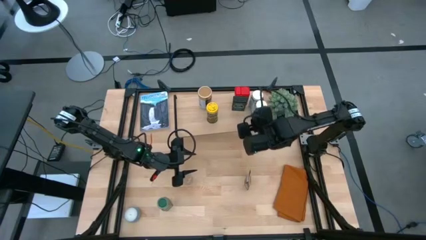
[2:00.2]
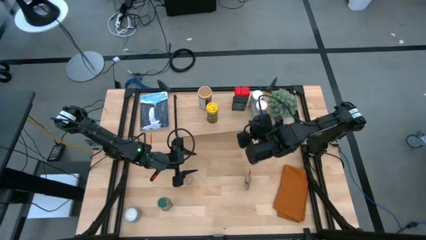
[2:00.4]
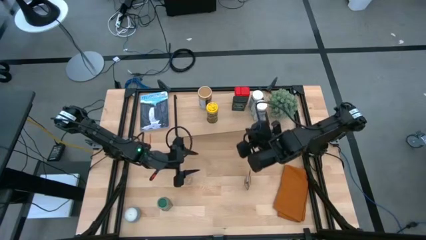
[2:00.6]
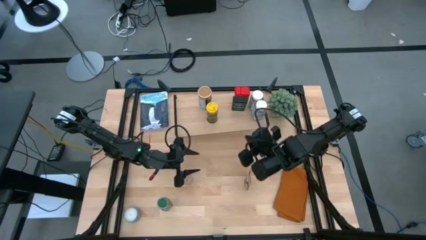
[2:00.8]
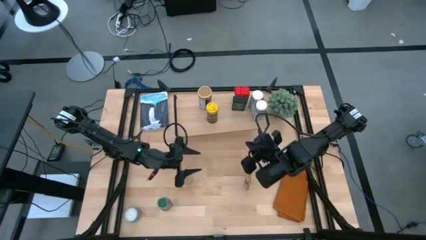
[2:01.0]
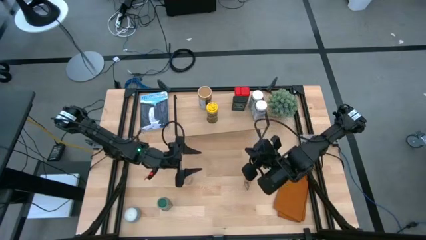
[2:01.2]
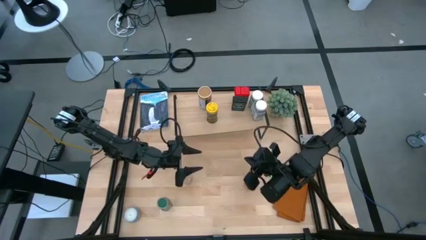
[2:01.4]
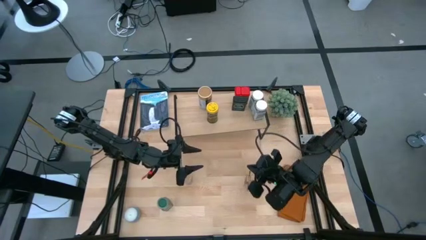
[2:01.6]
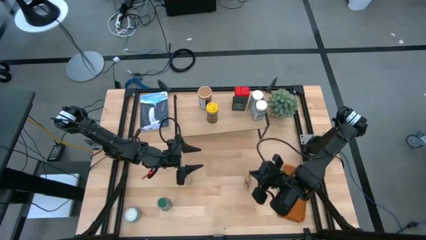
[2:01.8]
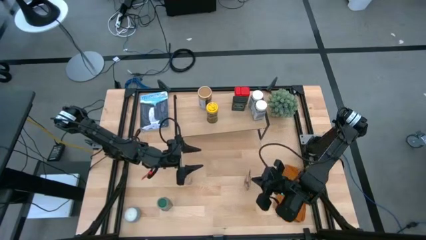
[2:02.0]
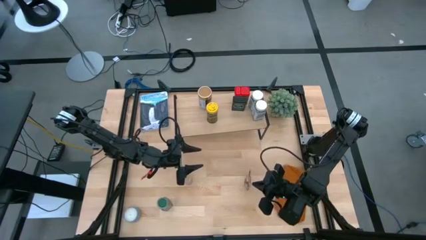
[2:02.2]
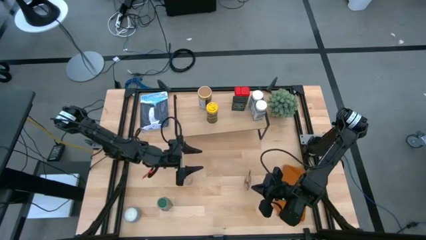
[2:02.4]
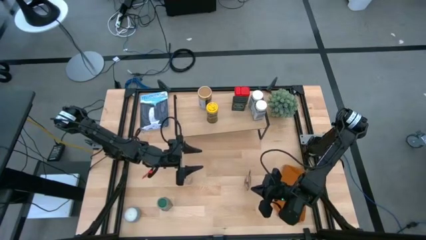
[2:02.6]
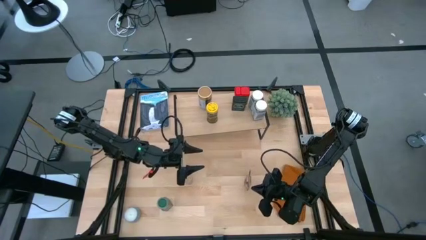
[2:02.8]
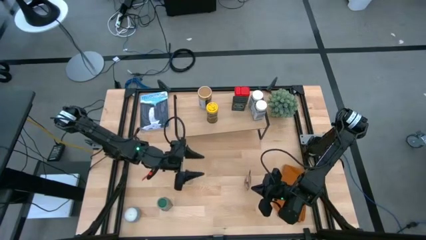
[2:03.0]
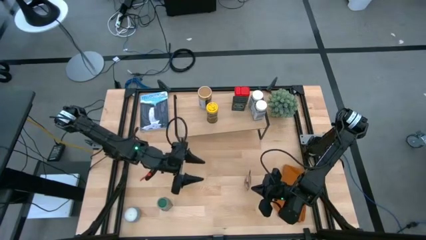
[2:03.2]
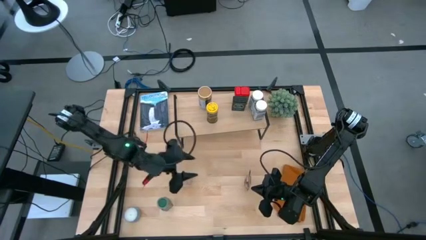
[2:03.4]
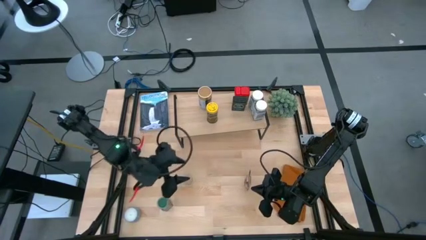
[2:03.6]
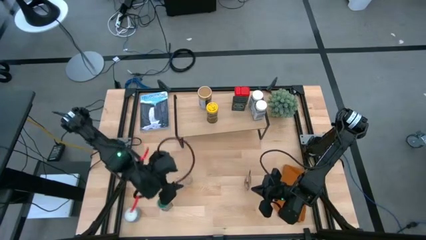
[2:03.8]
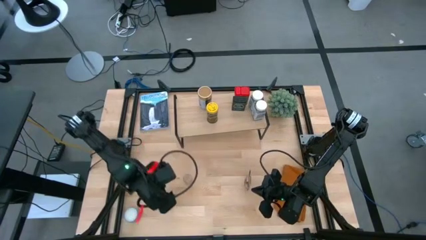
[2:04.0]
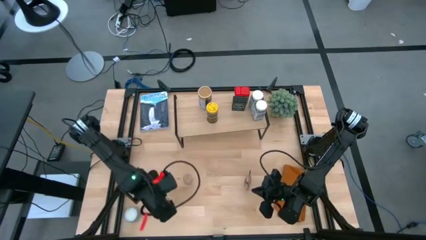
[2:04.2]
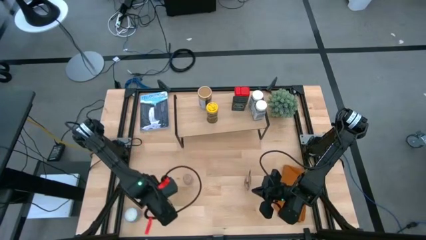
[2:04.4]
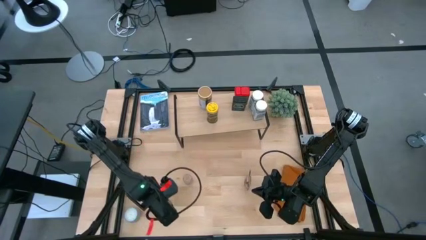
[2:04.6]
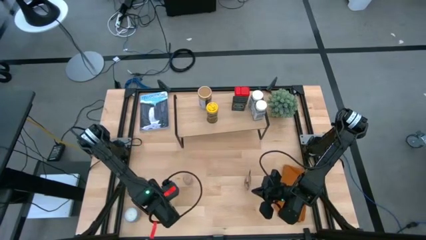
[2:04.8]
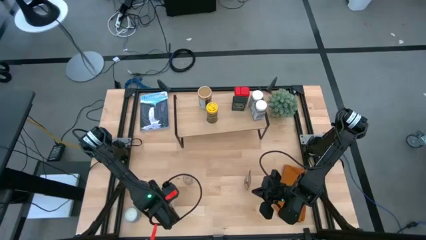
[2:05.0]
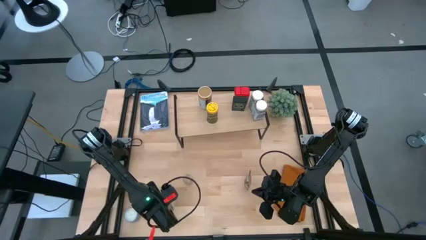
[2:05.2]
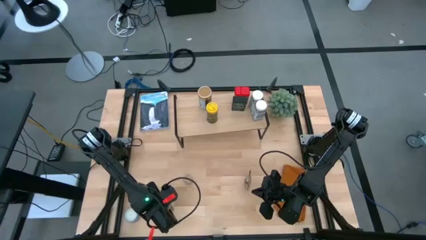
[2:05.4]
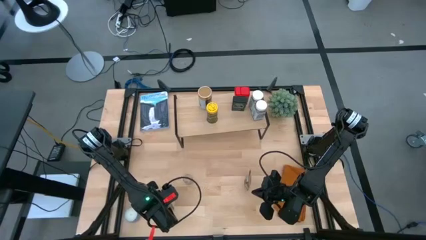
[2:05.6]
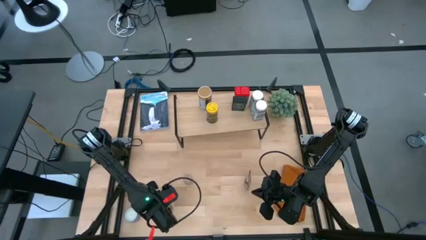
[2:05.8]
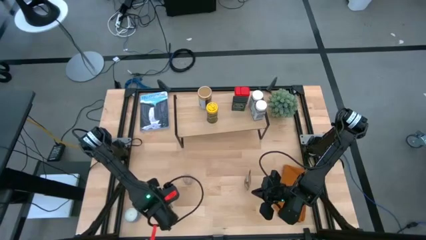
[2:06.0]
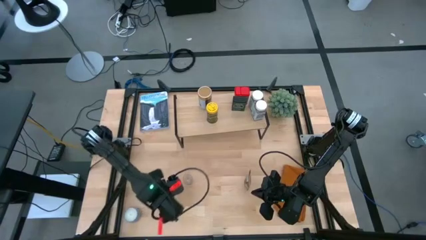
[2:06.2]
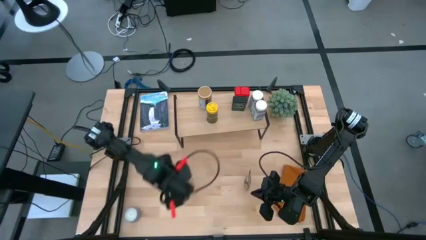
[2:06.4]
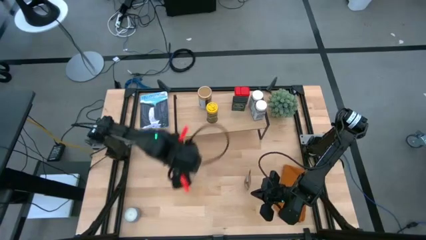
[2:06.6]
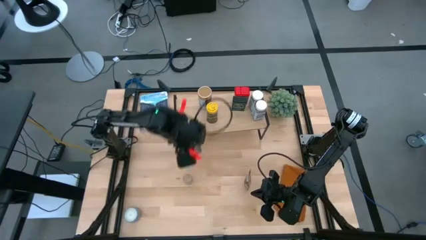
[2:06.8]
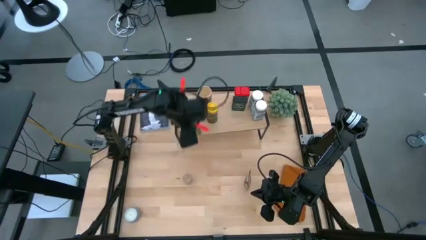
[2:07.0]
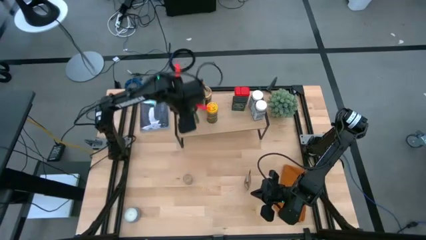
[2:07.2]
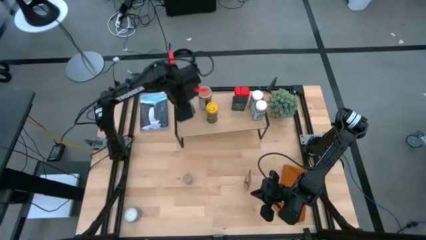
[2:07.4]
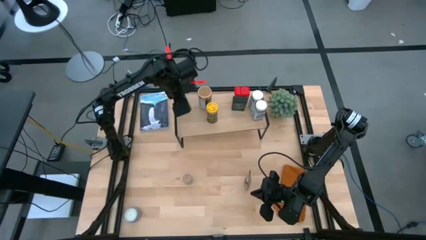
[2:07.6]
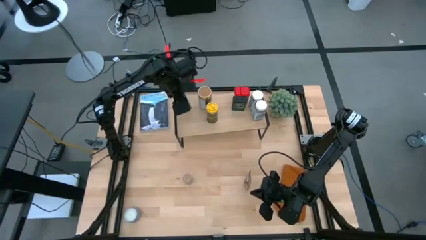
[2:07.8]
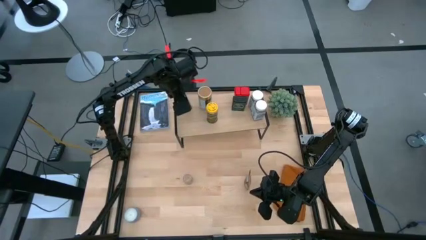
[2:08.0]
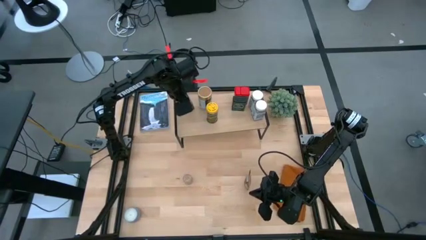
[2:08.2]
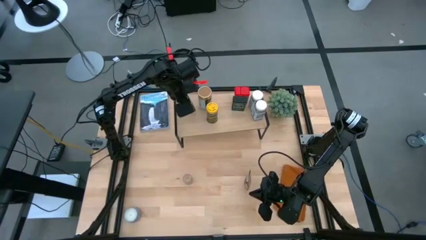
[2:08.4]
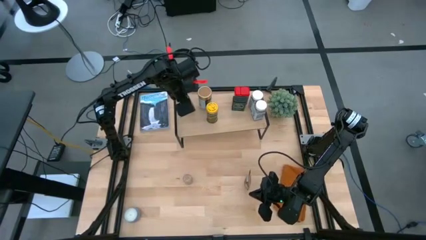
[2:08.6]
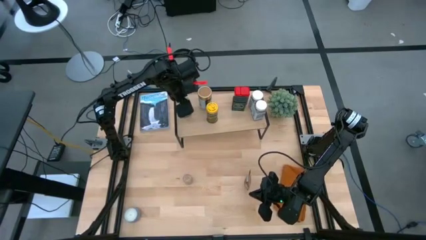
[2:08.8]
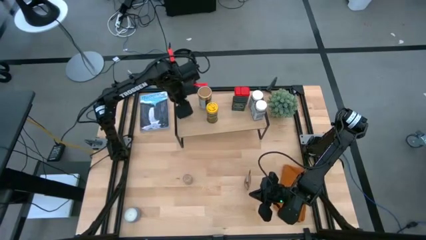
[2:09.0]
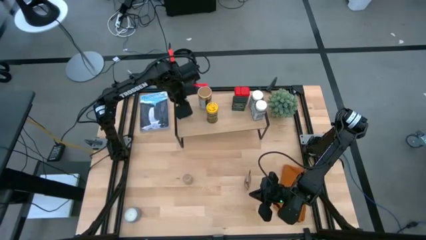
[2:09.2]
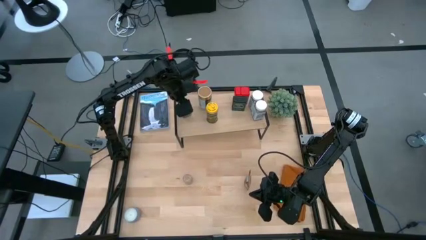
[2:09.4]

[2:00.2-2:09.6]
Task: Shelf spices
Put the green seasoning bottle on the shelf aligned with the other golden seasoning bottle

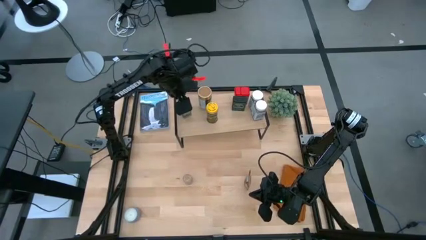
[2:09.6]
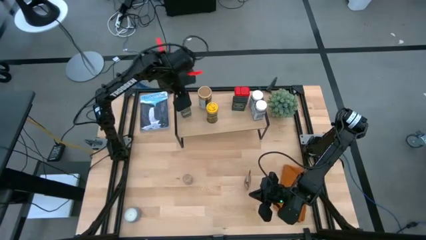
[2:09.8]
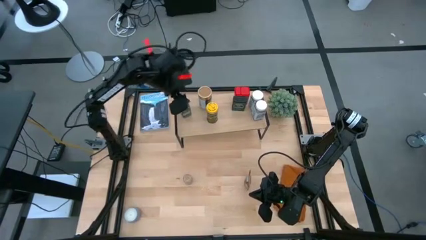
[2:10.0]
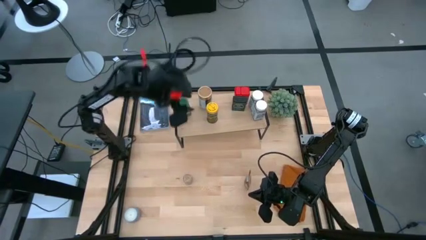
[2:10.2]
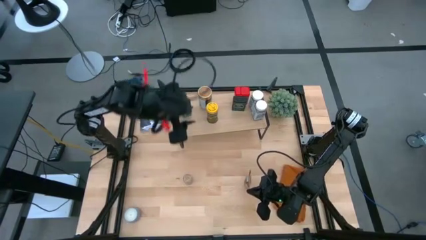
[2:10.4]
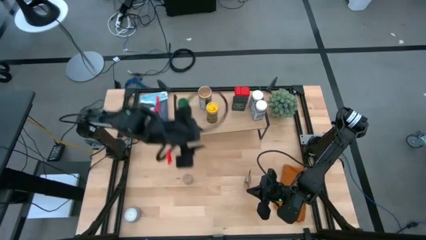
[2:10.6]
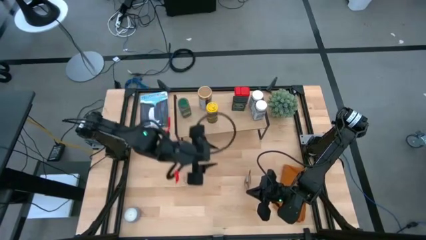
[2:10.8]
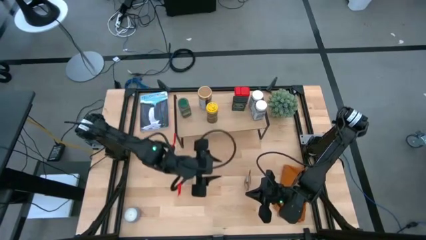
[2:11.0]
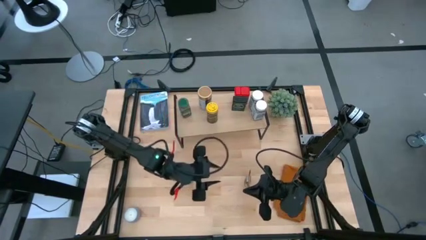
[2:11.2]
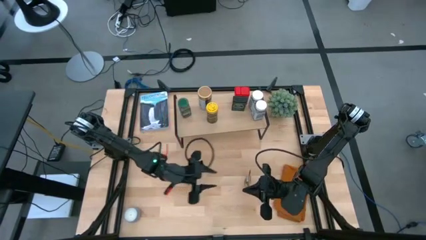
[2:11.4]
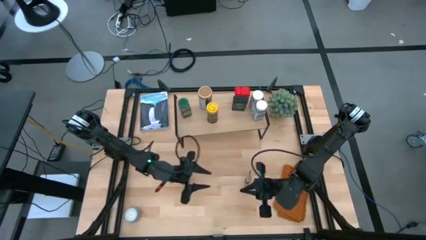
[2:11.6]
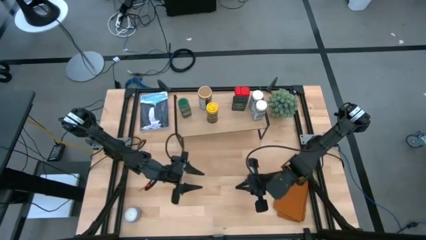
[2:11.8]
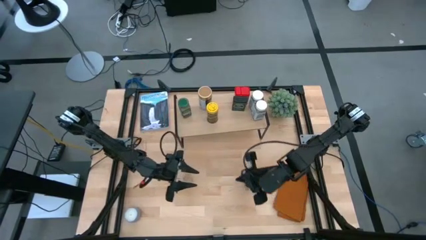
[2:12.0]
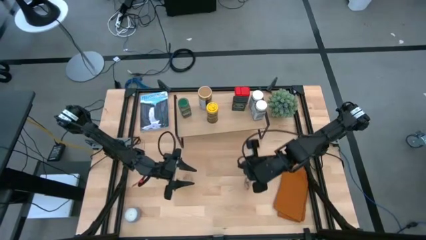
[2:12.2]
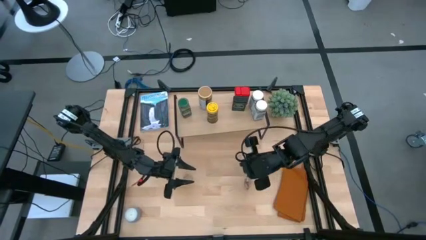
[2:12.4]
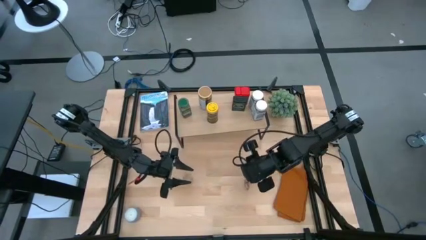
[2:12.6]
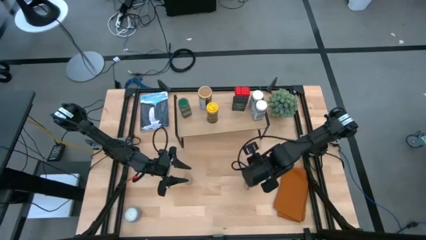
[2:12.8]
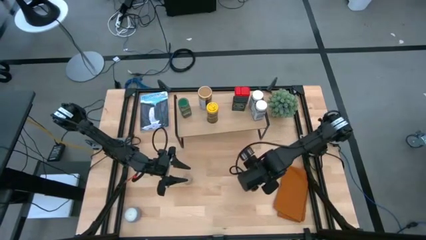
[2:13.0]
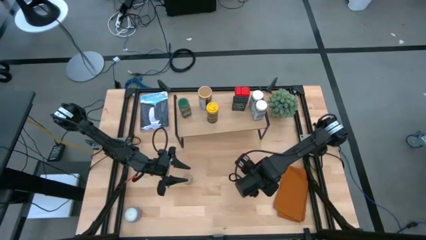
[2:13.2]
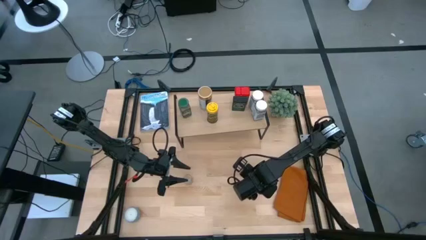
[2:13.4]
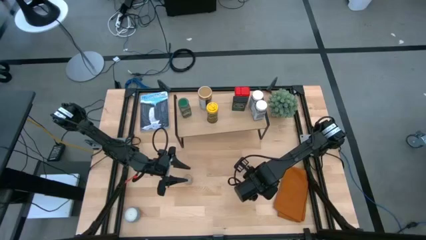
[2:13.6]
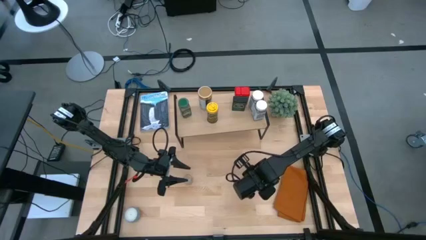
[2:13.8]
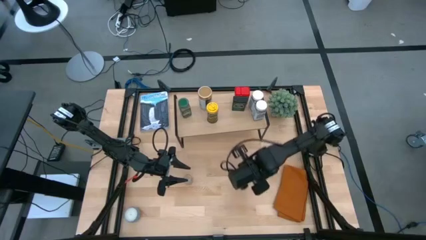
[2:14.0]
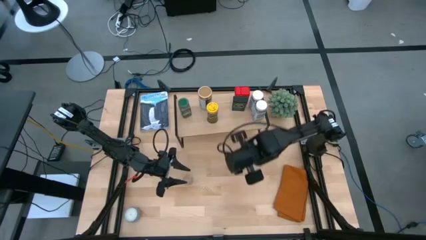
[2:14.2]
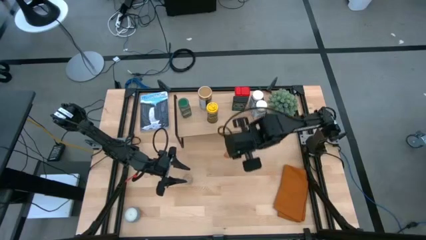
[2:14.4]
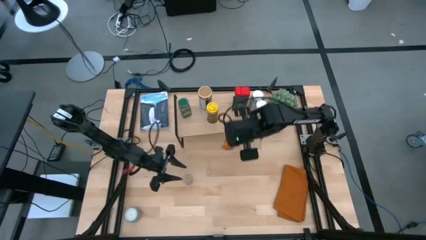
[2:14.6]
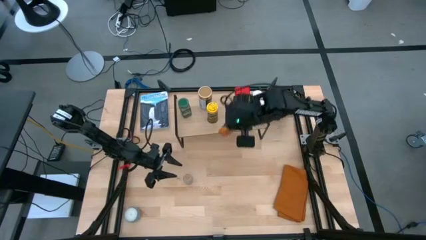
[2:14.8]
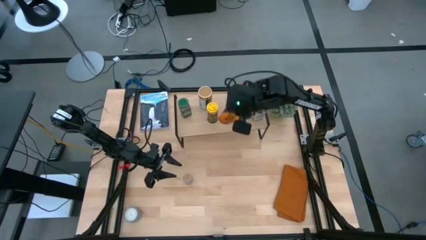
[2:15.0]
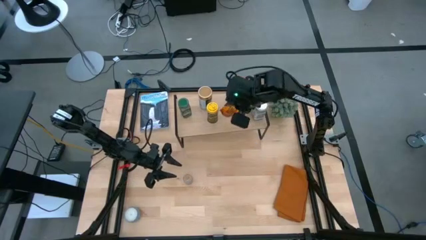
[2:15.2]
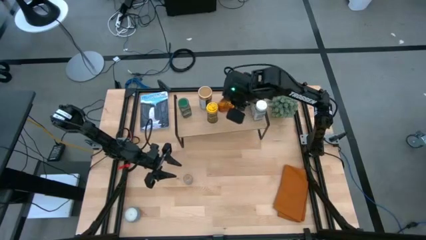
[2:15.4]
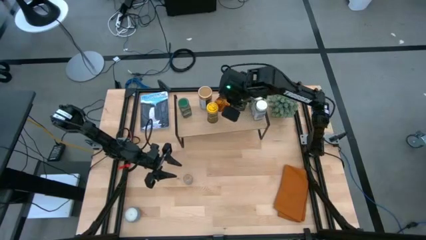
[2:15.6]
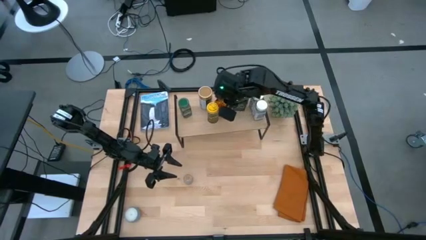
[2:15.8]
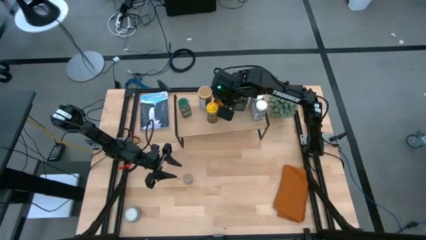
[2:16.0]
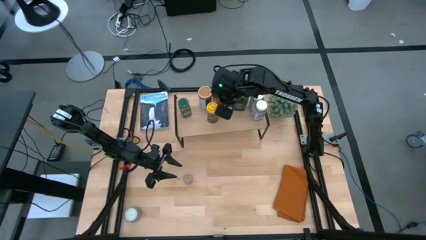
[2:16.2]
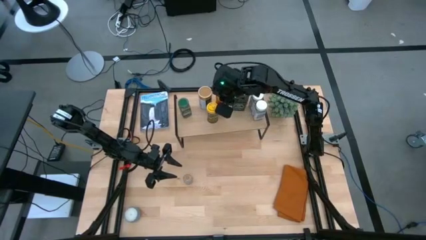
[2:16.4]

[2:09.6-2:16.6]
Put the orange seasoning bag on the shelf aligned with the other red seasoning can
